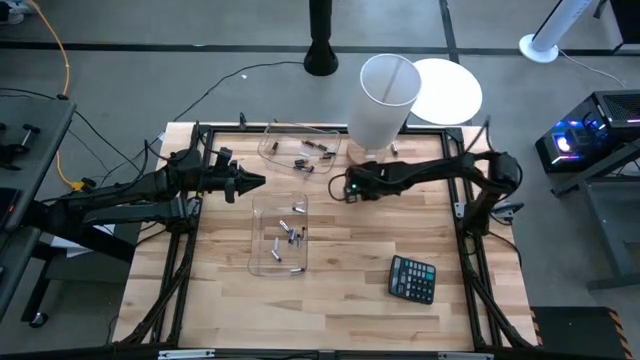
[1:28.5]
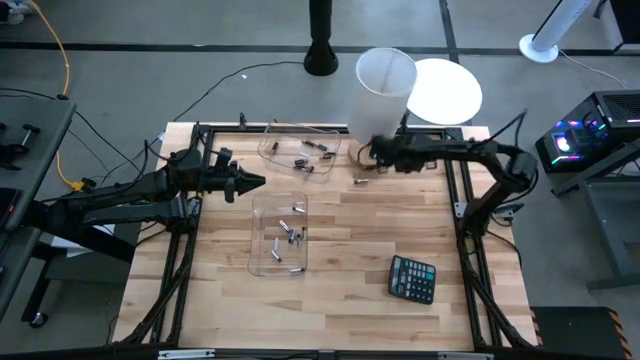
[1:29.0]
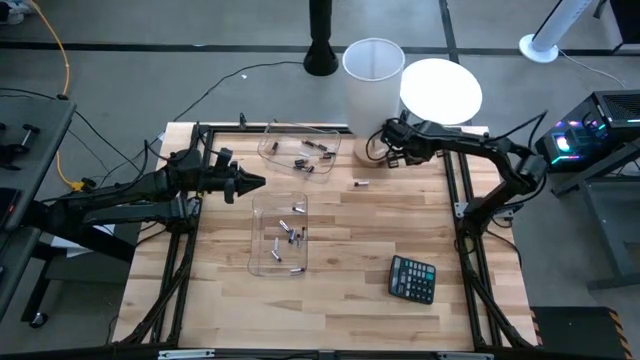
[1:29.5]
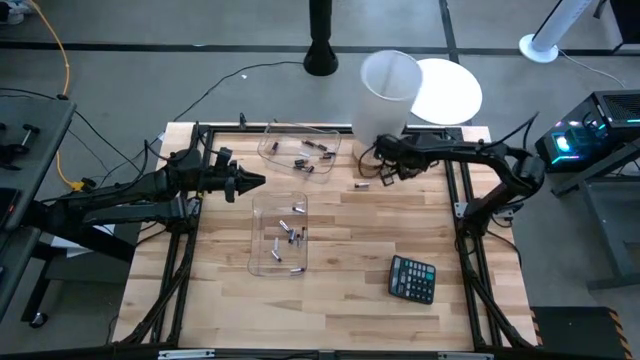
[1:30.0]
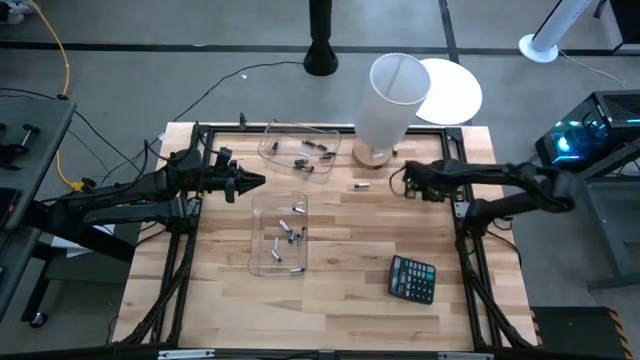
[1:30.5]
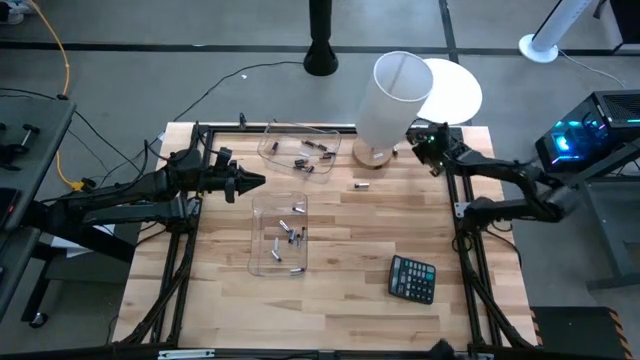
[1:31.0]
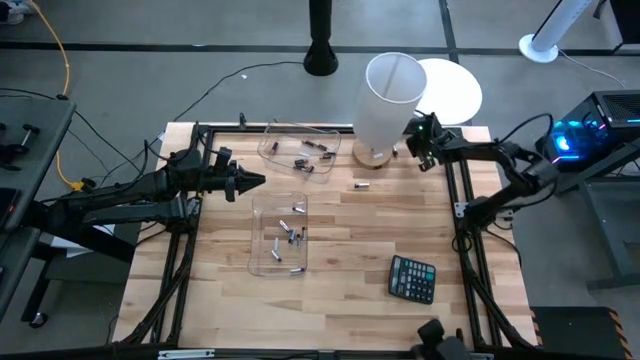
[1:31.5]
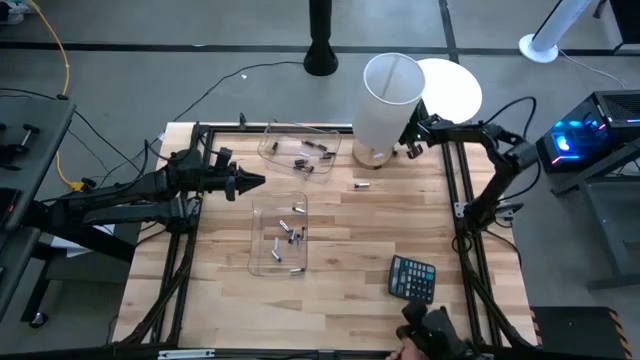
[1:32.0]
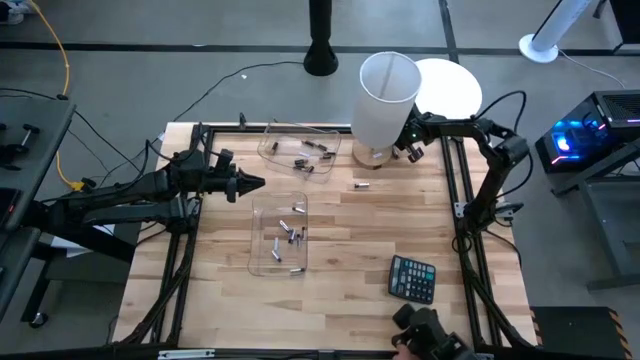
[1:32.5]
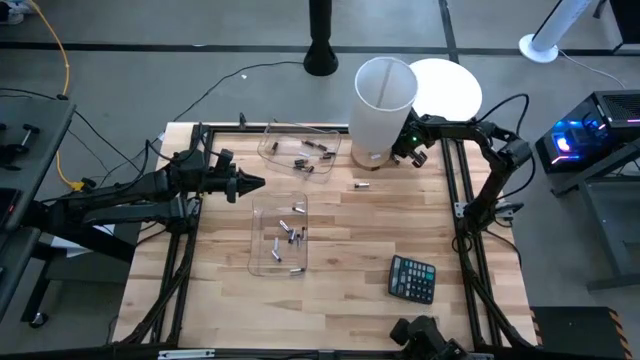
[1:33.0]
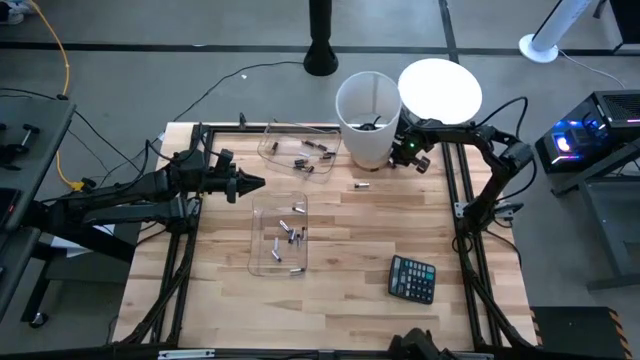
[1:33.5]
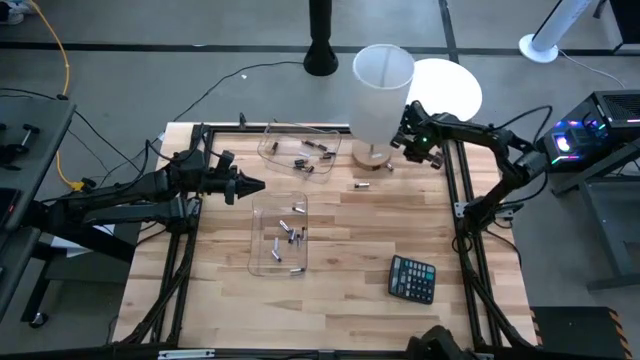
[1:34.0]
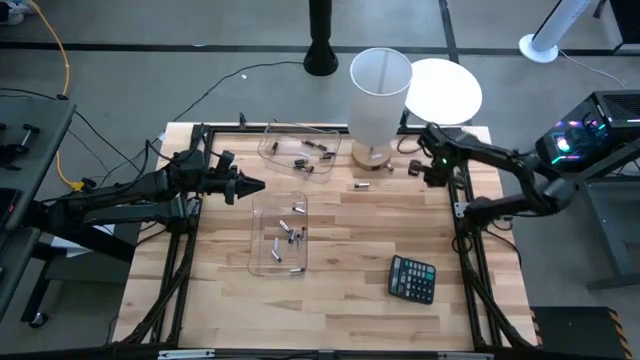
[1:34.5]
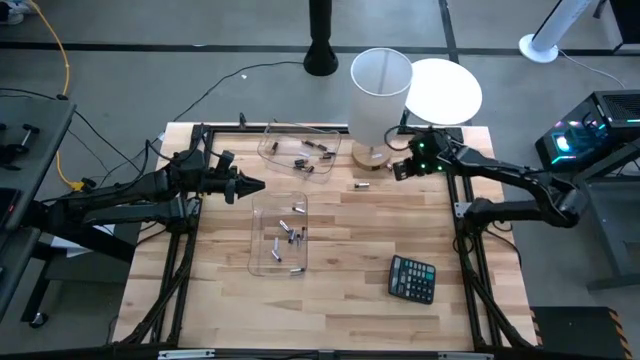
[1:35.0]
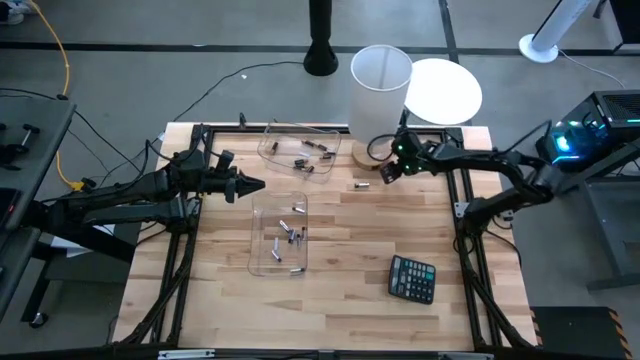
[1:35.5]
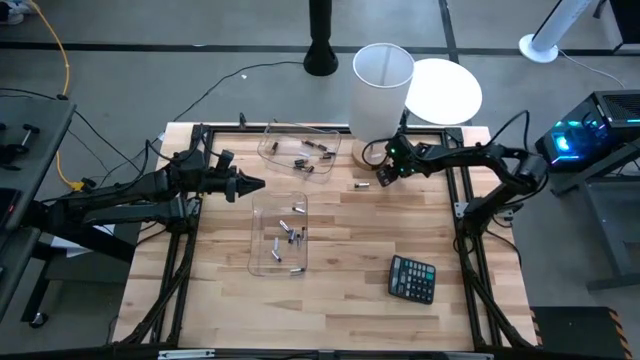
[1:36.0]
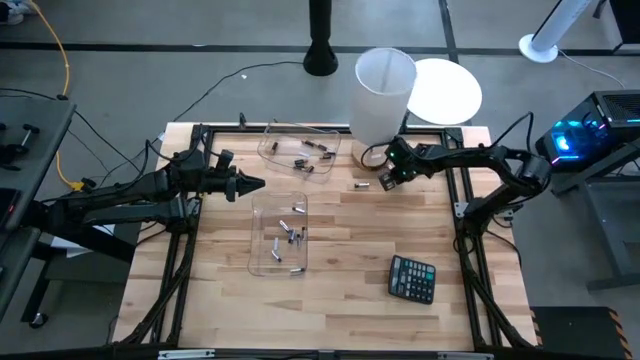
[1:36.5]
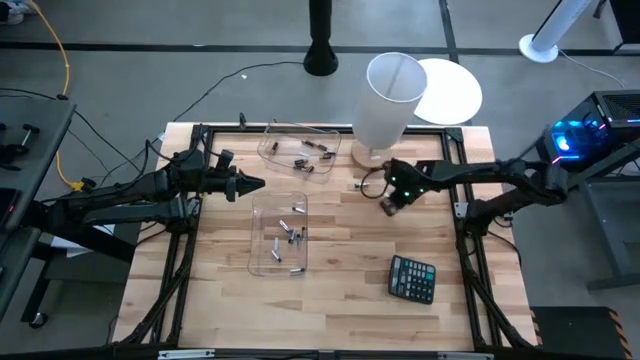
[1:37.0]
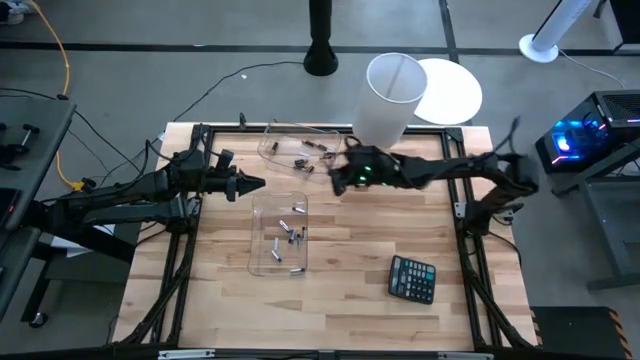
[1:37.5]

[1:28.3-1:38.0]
Task: Sort batteries
Put the white battery into the bottom transparent bin

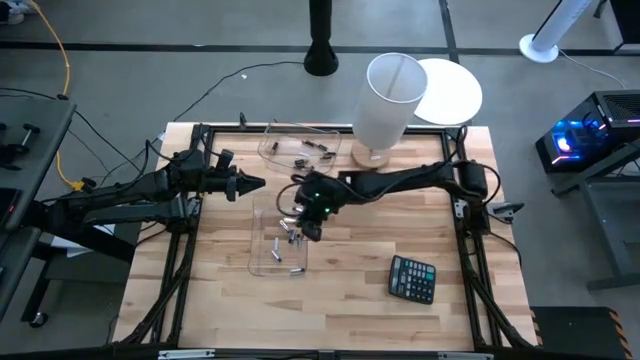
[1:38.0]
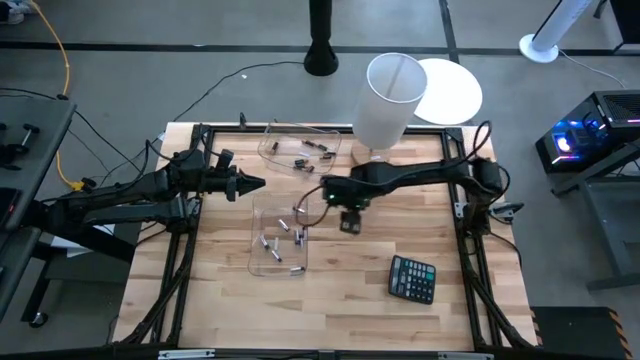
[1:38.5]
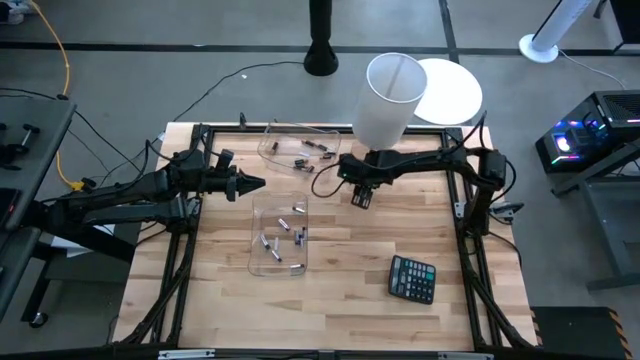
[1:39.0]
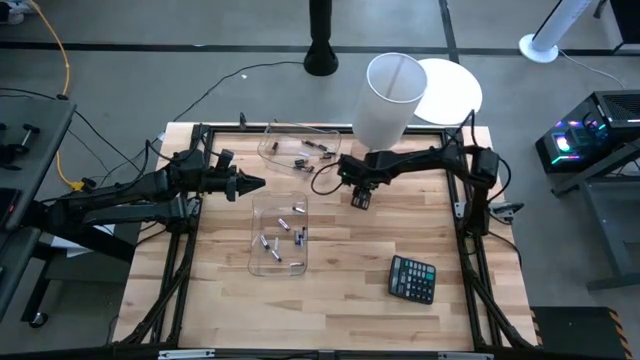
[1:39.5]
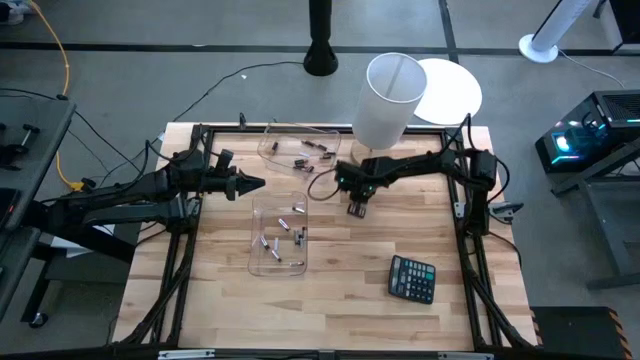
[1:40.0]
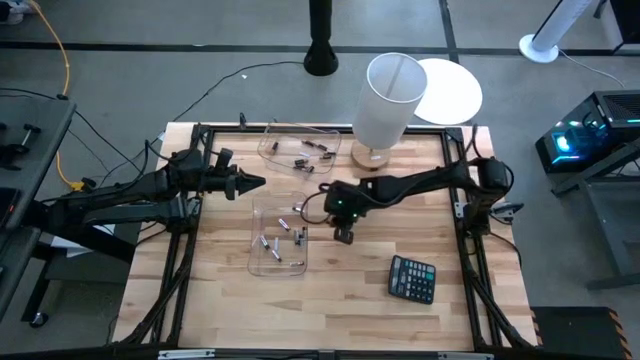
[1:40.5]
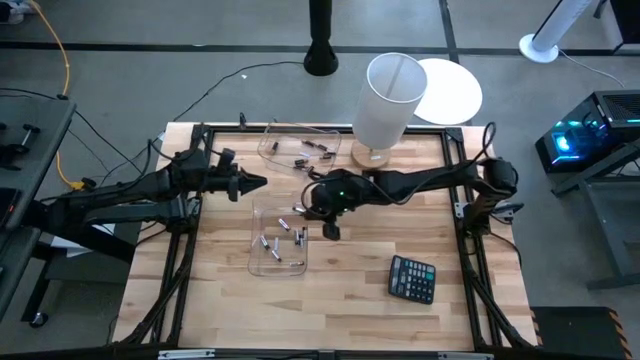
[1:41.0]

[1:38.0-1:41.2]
Put the white battery into the bottom transparent bin

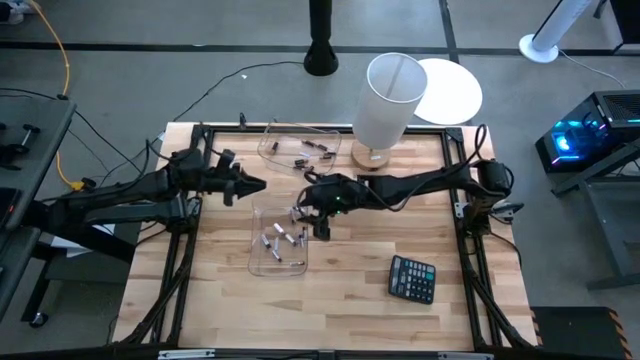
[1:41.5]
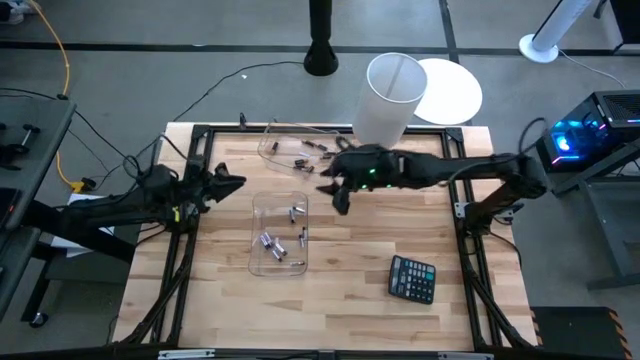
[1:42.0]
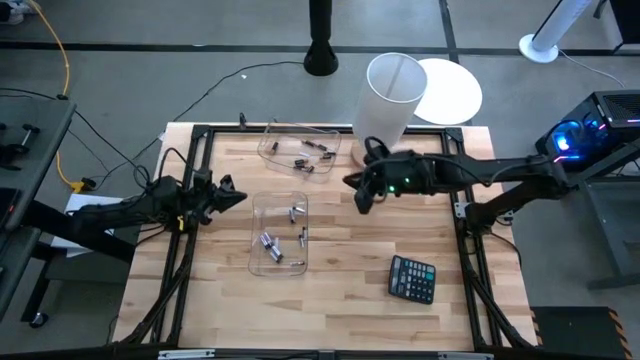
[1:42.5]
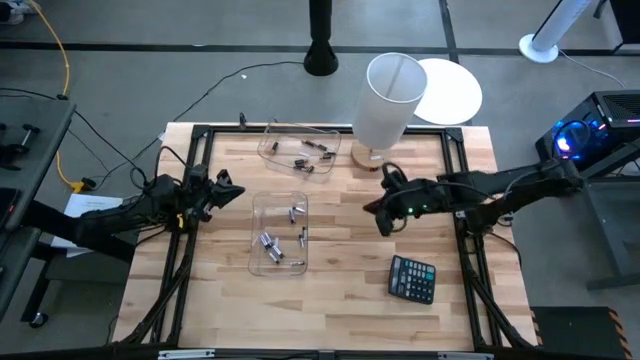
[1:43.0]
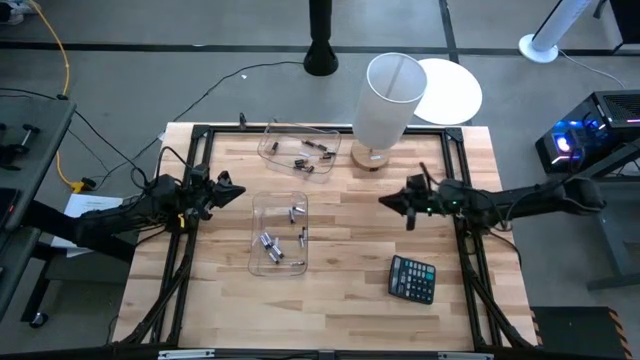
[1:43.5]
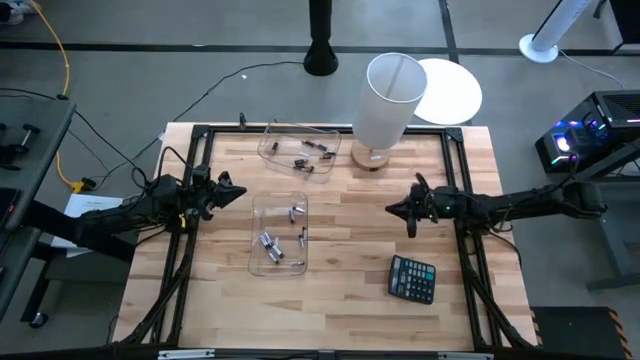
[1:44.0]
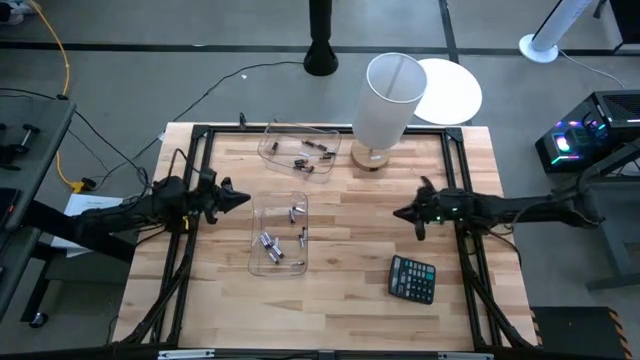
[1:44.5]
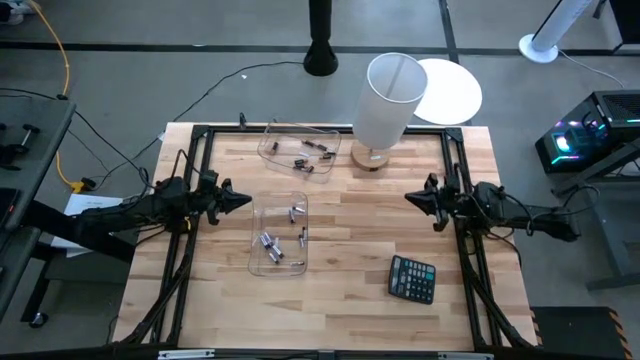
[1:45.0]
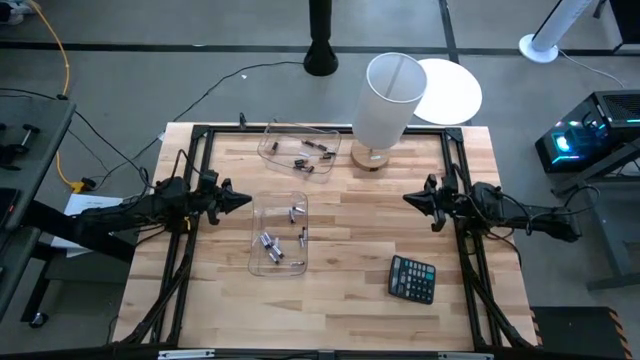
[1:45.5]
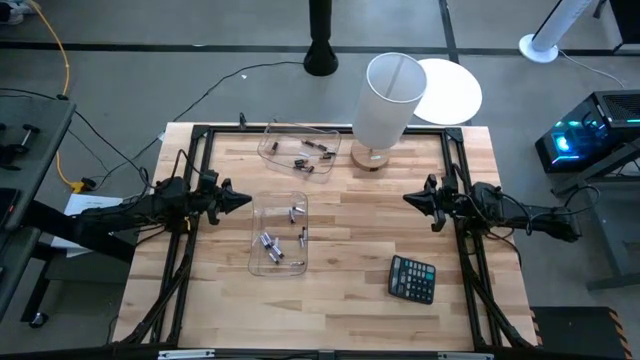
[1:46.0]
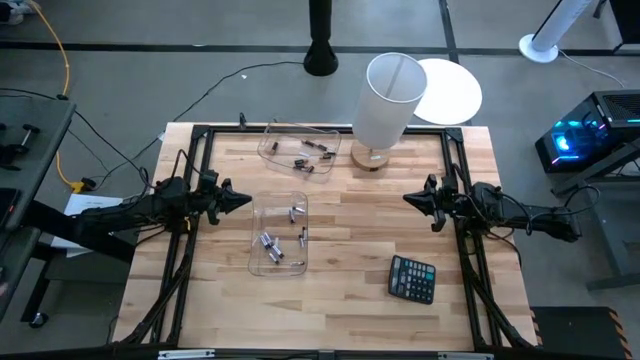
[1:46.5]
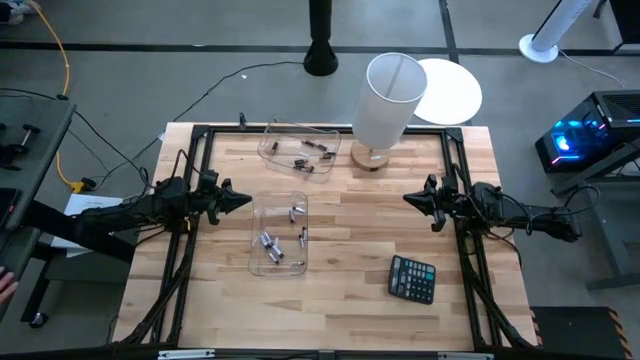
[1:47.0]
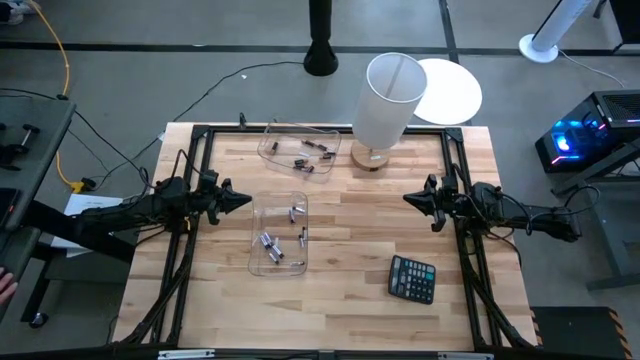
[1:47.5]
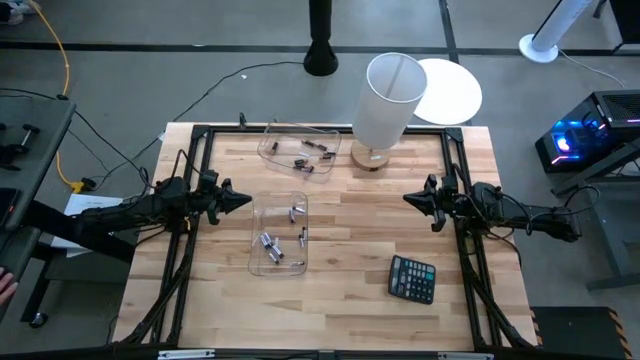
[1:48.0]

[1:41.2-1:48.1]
Return to Home Position

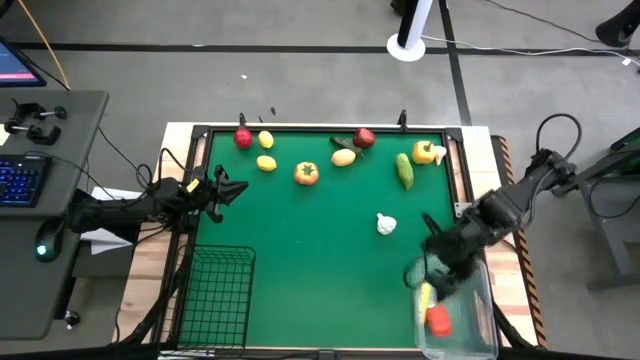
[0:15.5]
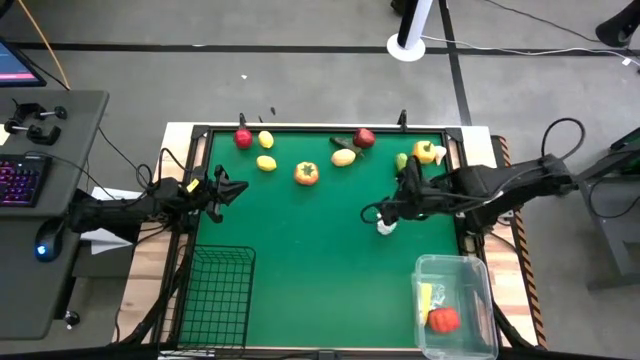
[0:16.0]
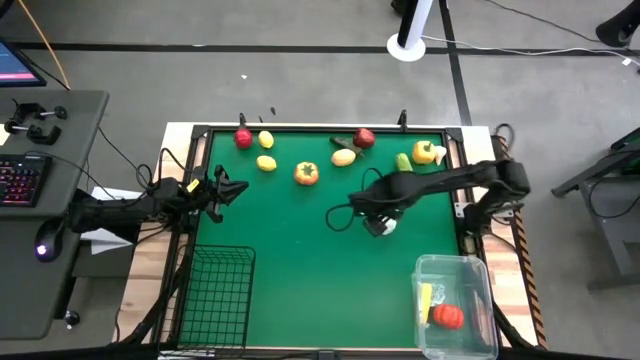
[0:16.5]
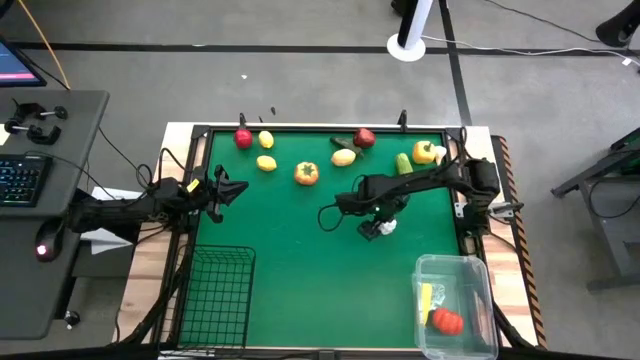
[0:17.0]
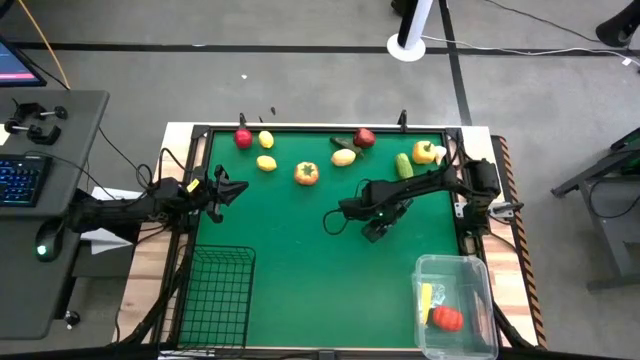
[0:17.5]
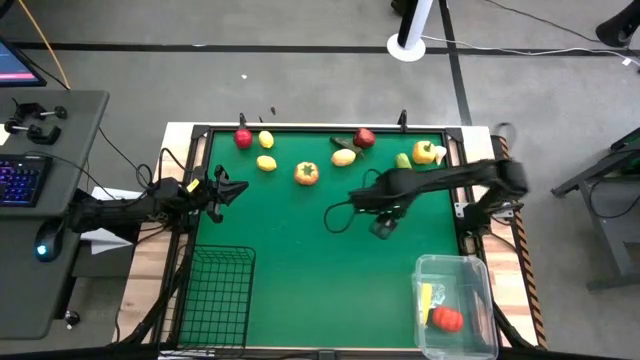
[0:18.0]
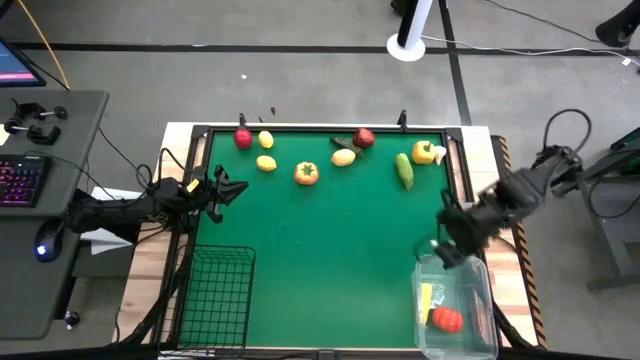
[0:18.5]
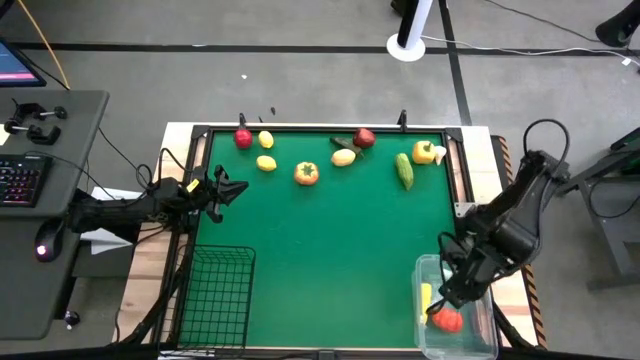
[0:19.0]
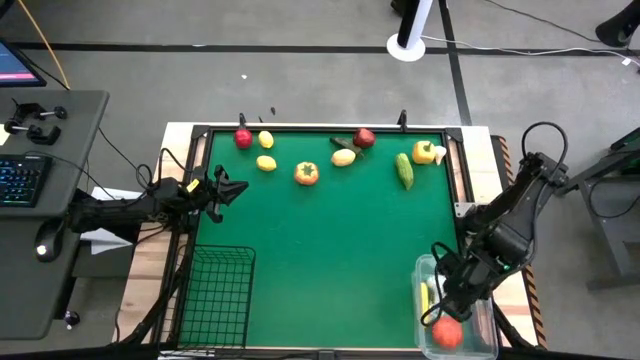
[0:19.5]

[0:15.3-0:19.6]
Task: Sort produce into baskets
Put the white garlic into the transparent bin
